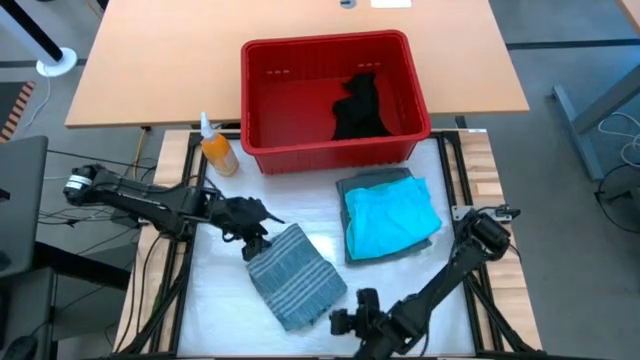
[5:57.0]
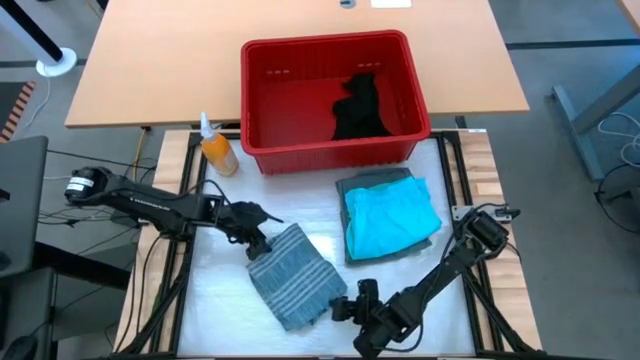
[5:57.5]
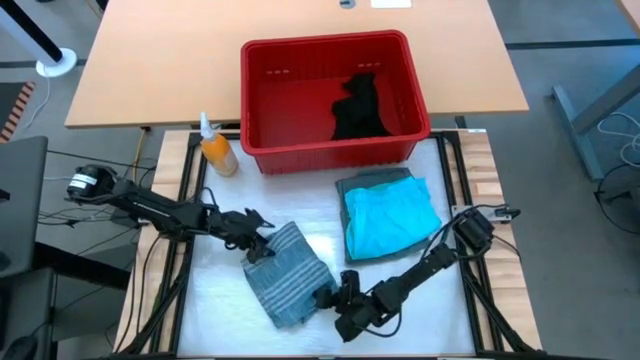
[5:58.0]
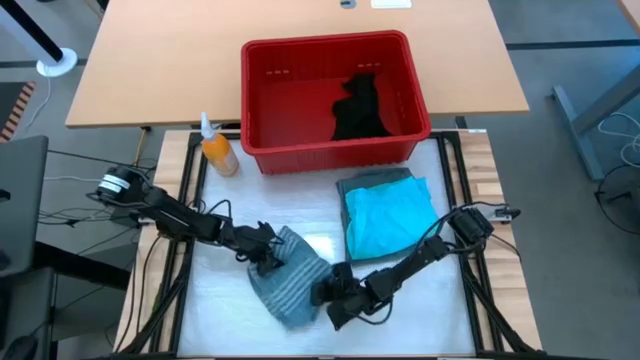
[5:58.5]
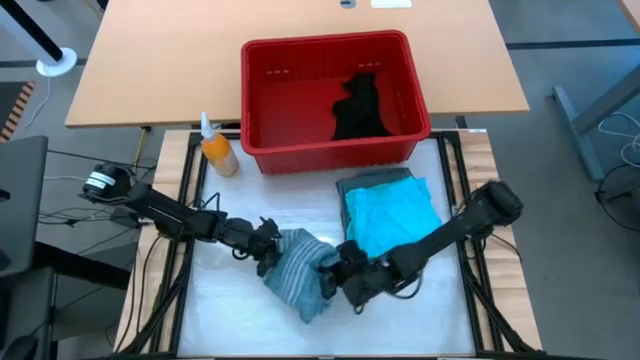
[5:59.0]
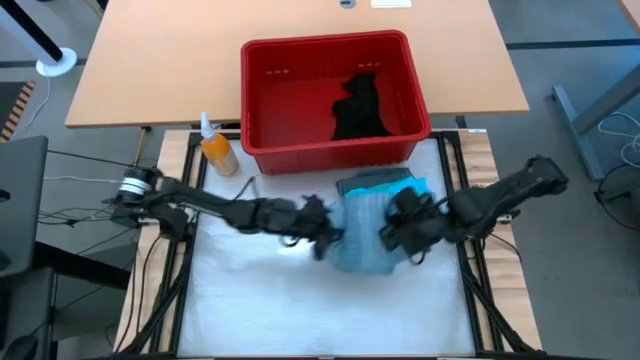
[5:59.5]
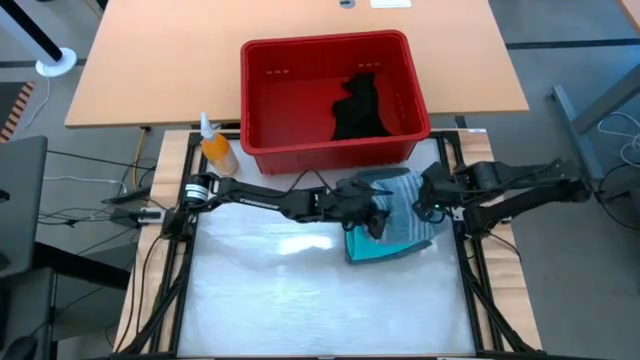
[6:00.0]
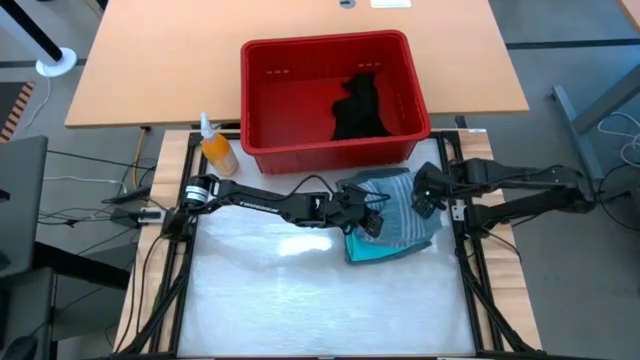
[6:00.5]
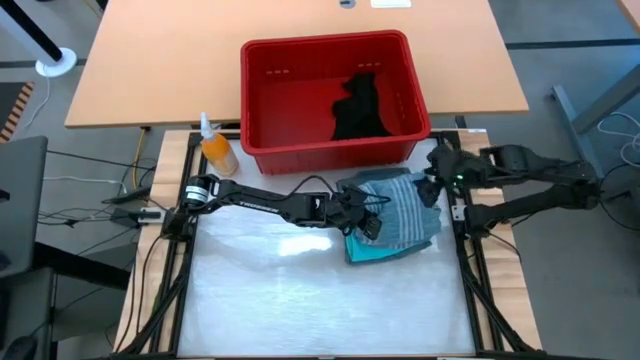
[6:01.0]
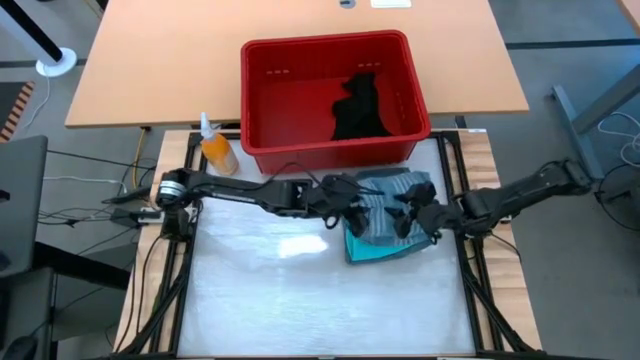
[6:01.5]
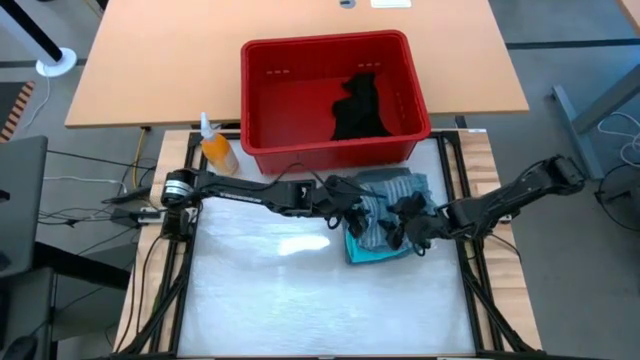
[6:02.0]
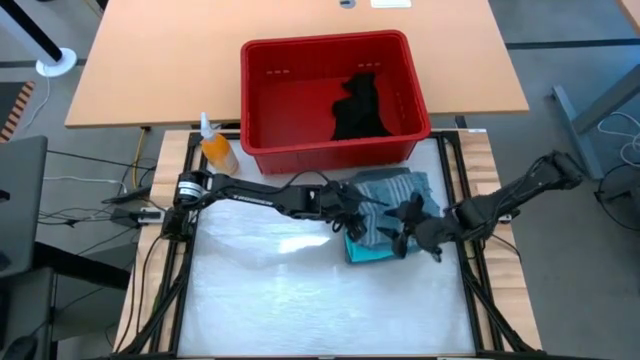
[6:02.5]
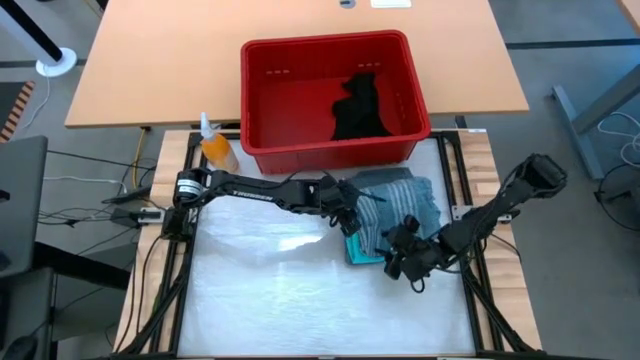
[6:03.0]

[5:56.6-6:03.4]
Task: Fold Laundry from Bin
Stack the folded blue patterned polo shirt on the folded light blue shorts

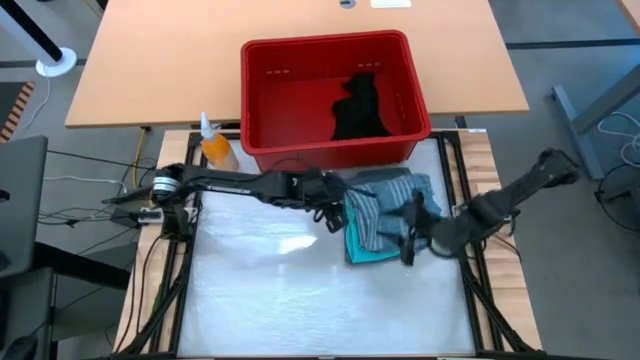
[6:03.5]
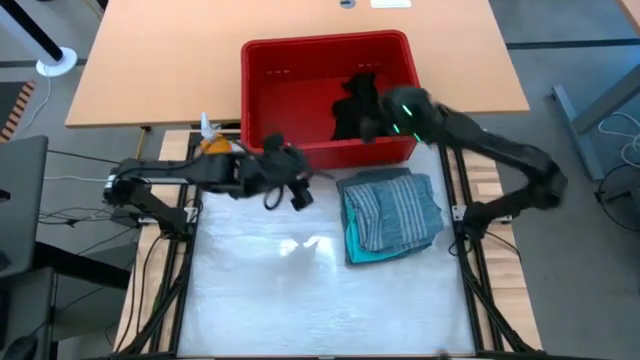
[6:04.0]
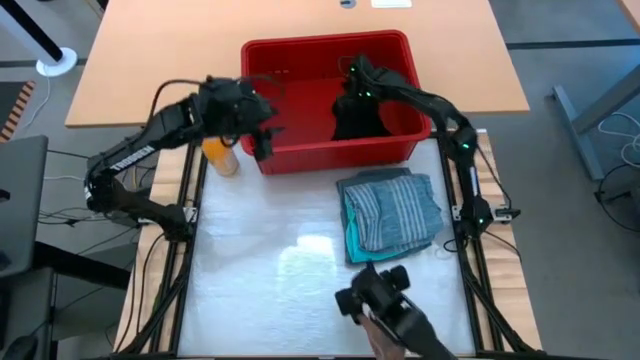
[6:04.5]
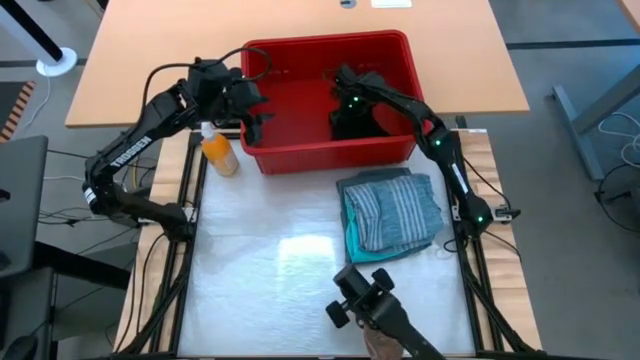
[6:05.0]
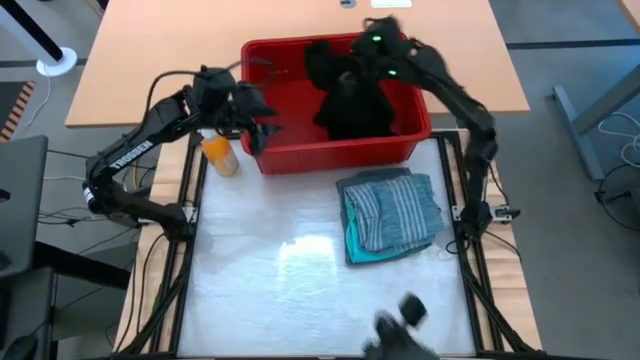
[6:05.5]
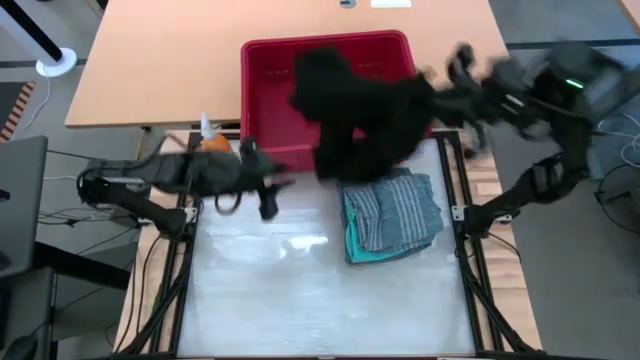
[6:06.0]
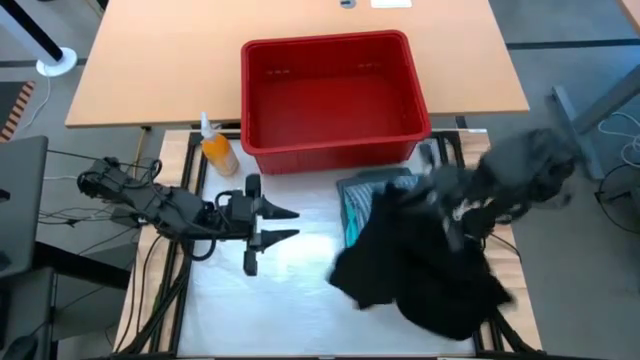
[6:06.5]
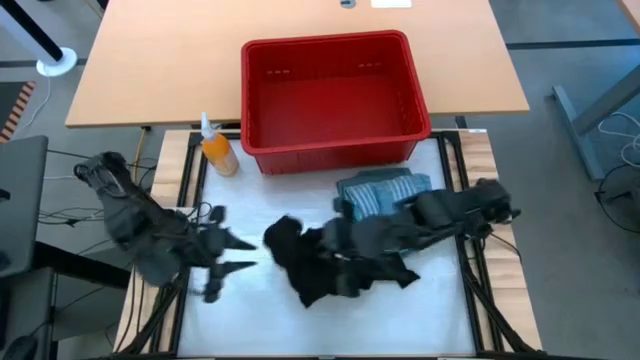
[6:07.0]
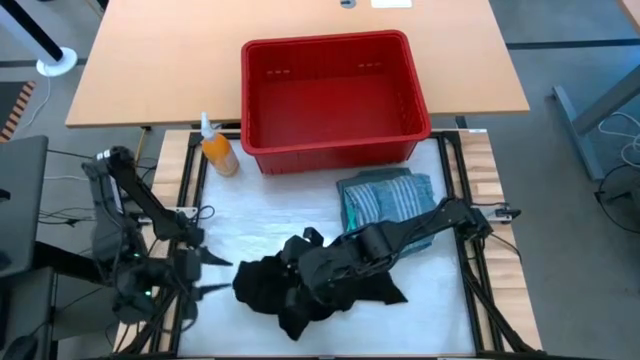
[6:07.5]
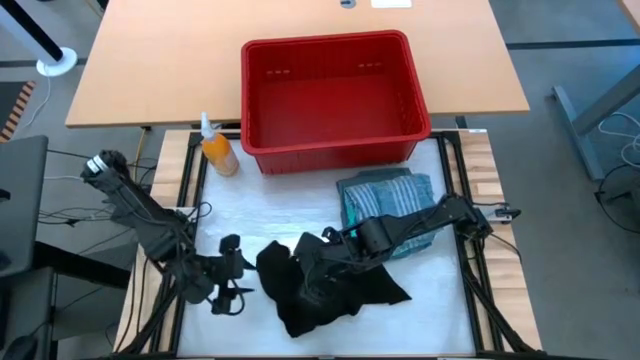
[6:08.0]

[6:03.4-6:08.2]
Remove the black shirt from the red bin

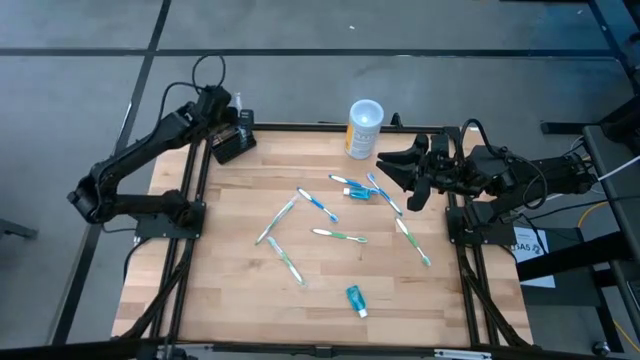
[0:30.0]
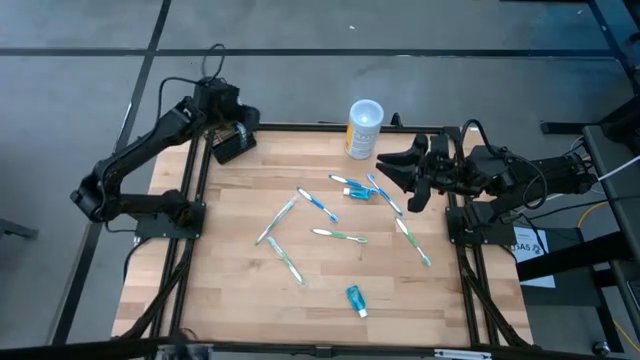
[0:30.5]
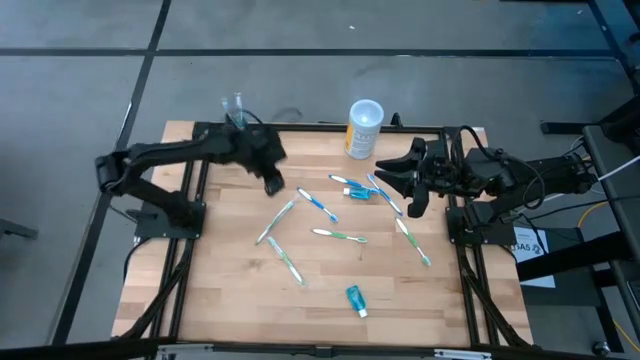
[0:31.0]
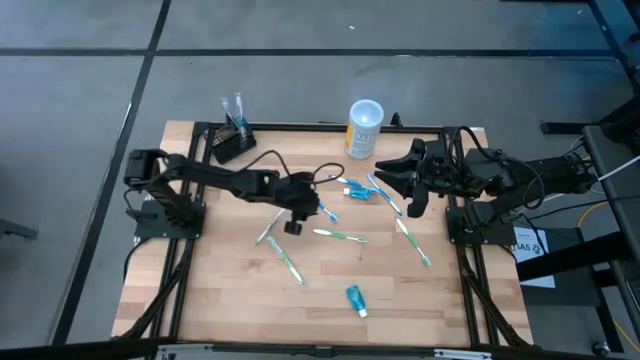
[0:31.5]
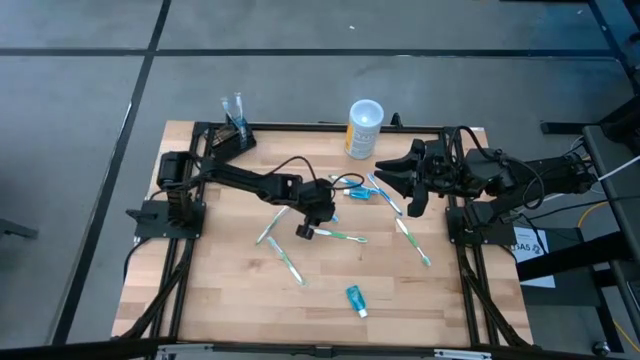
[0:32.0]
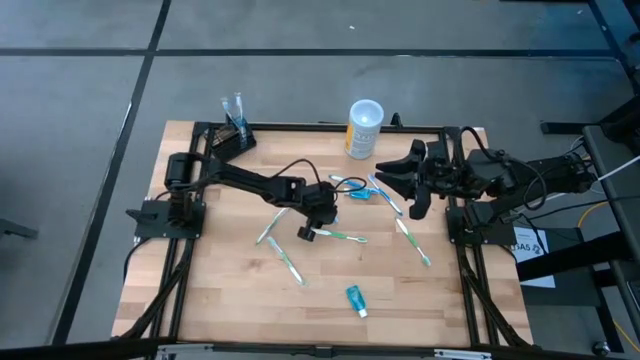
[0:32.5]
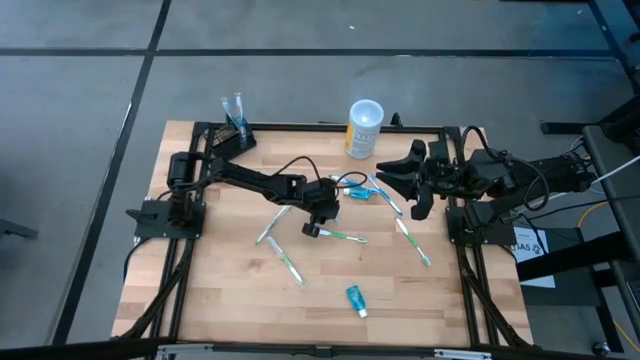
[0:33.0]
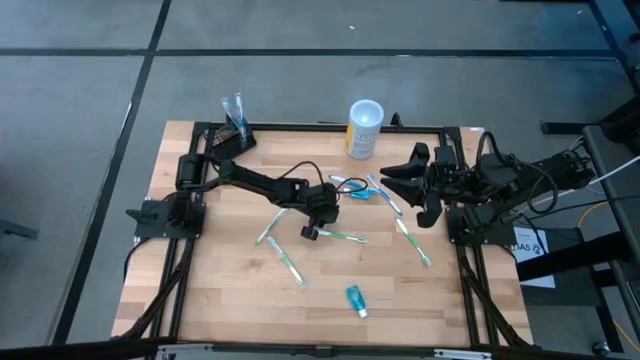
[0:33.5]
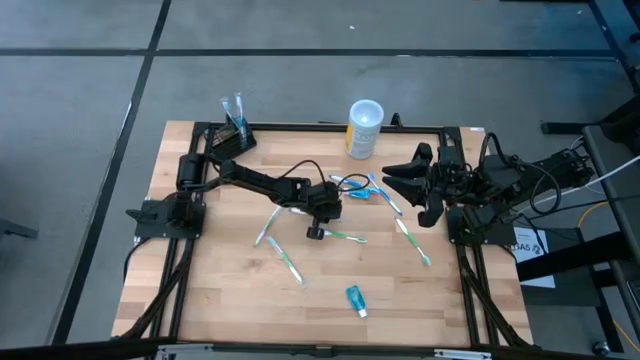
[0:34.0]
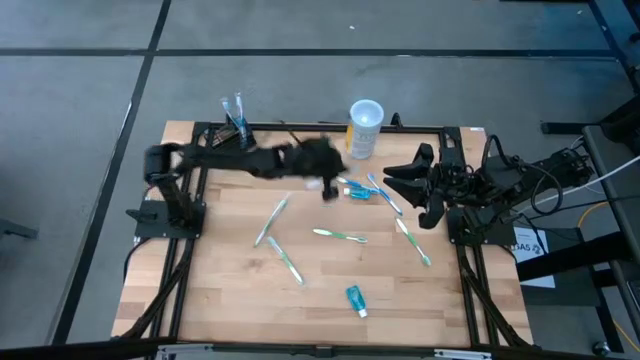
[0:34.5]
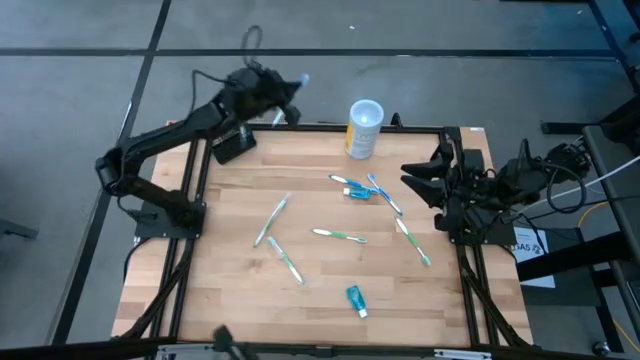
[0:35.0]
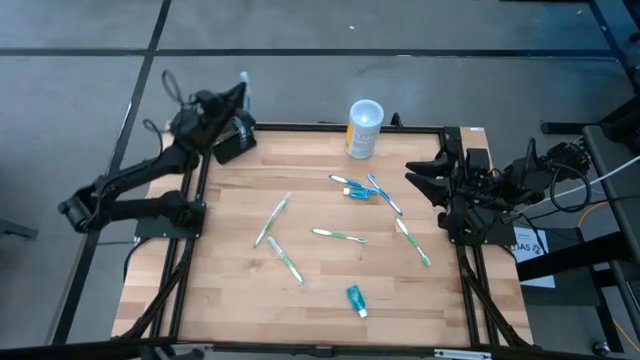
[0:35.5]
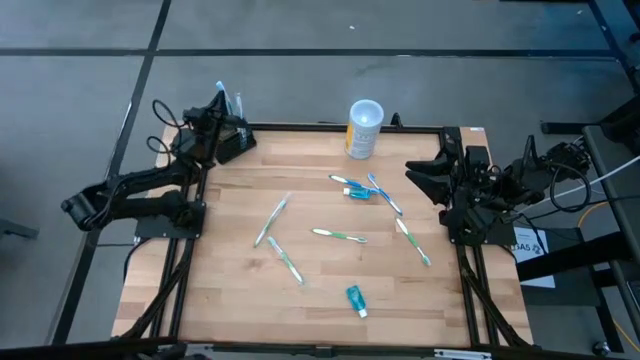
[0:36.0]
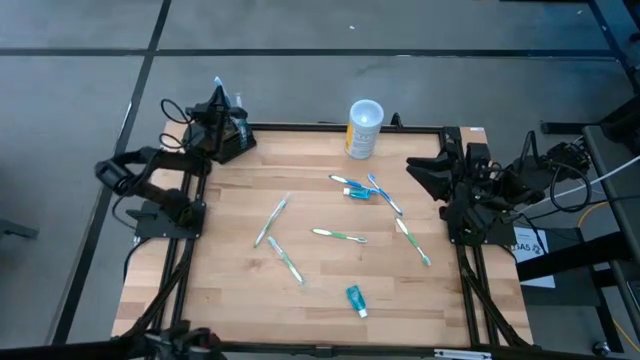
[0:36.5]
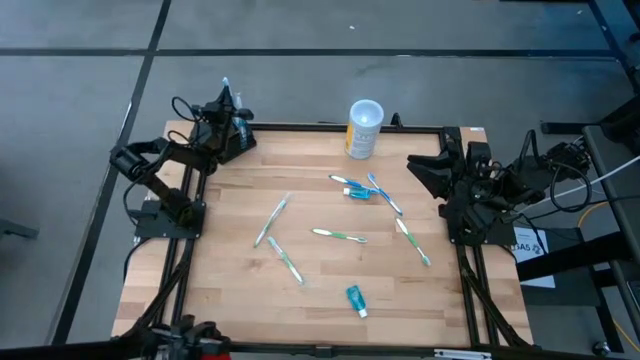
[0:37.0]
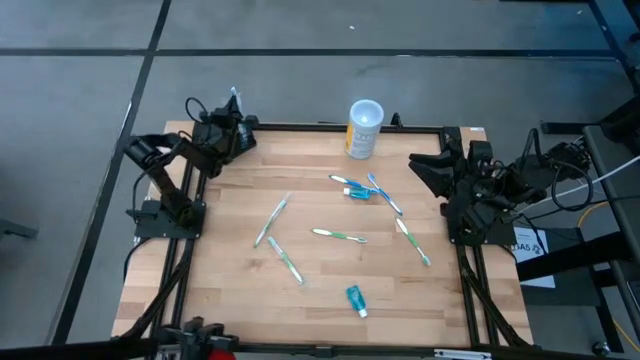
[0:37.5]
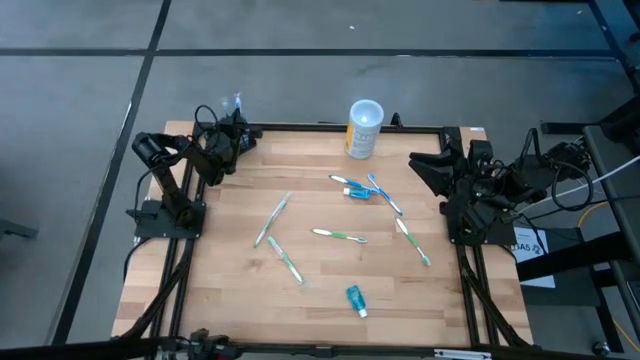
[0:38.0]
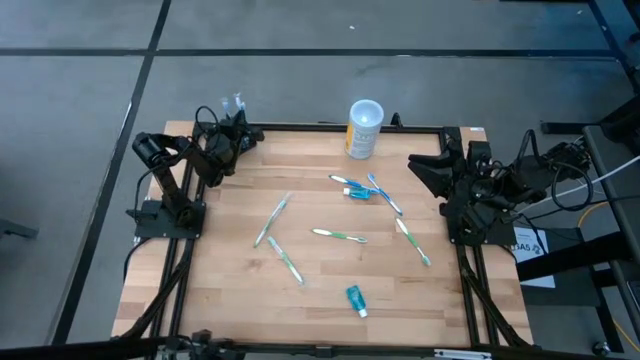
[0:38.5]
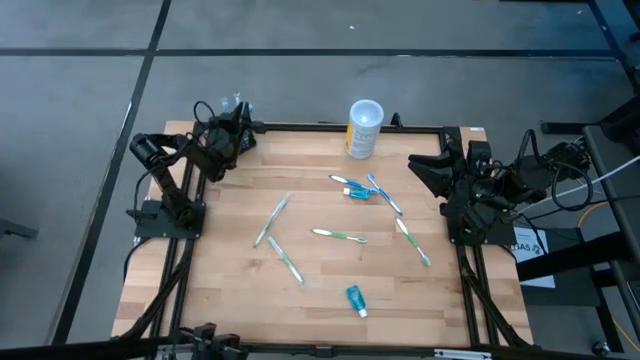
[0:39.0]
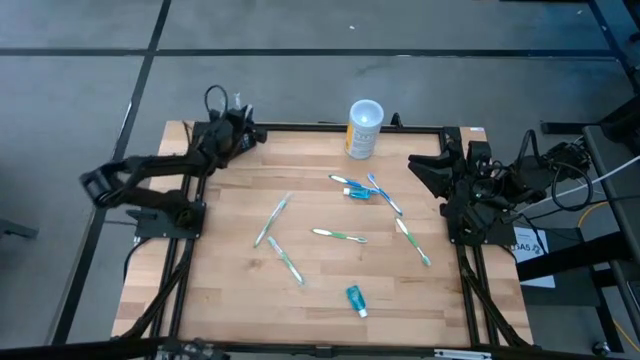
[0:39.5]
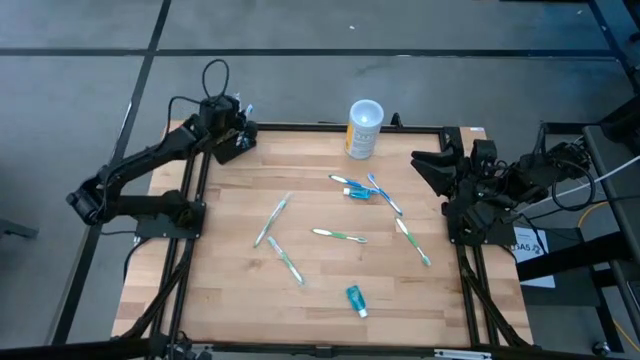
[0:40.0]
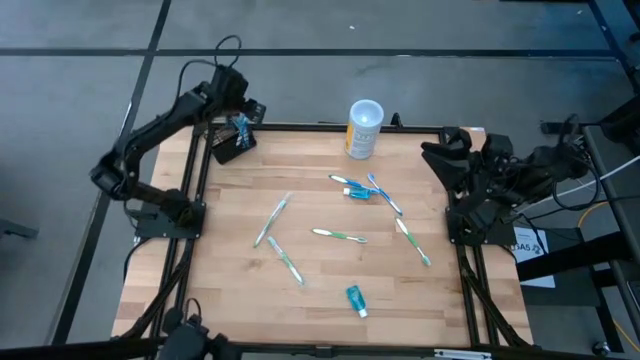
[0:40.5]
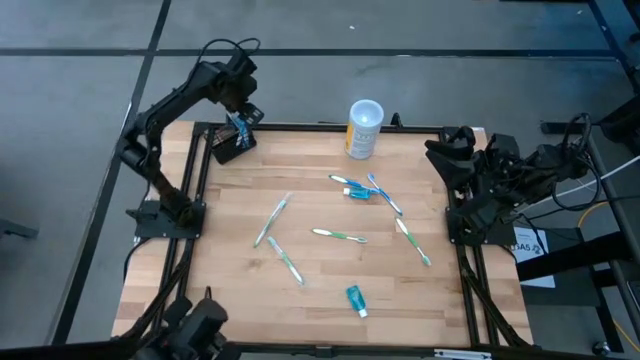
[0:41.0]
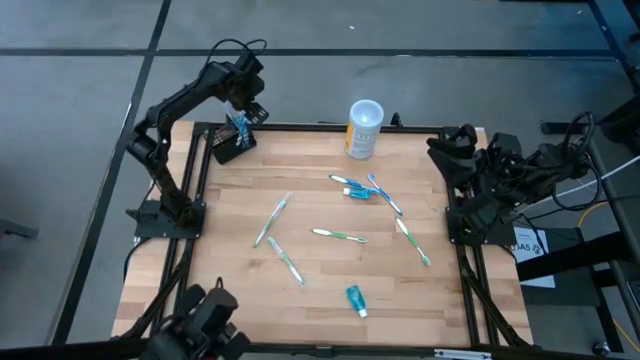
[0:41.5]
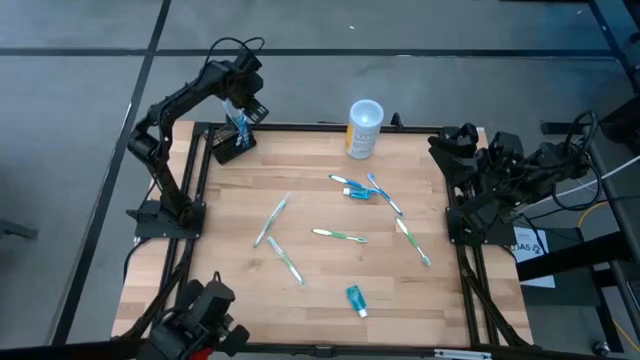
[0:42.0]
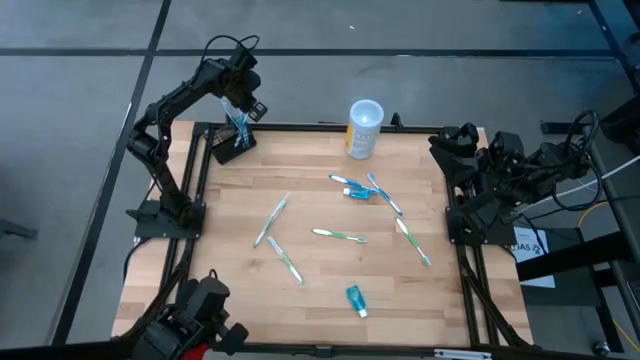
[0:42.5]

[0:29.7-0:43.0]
Task: Pick & Place toothbrushing station
Put the blue toothbrush into the right section of the black organizer
